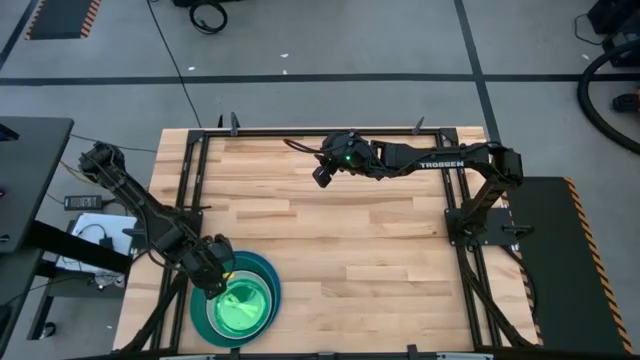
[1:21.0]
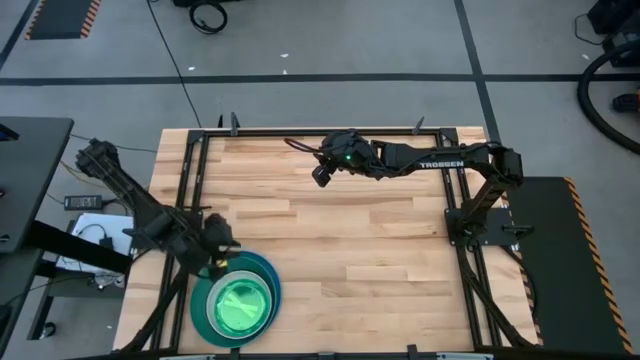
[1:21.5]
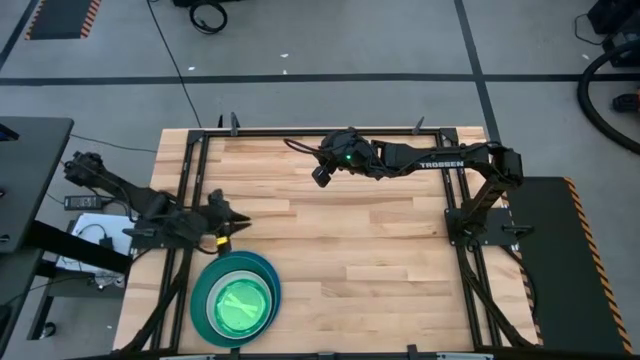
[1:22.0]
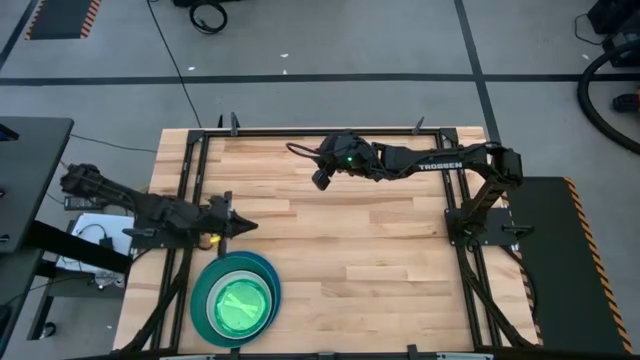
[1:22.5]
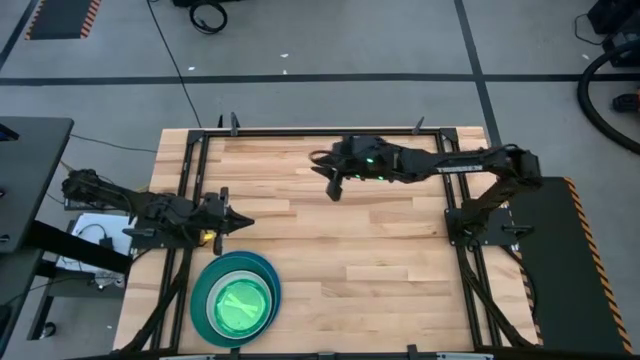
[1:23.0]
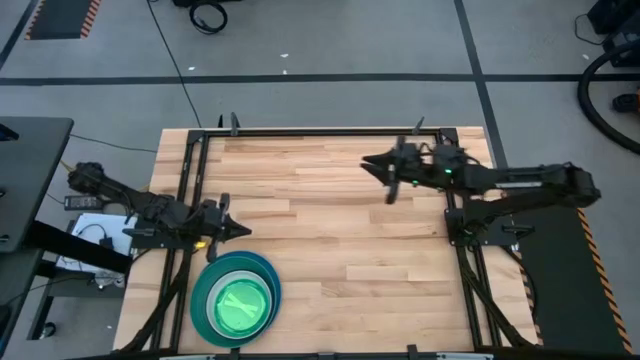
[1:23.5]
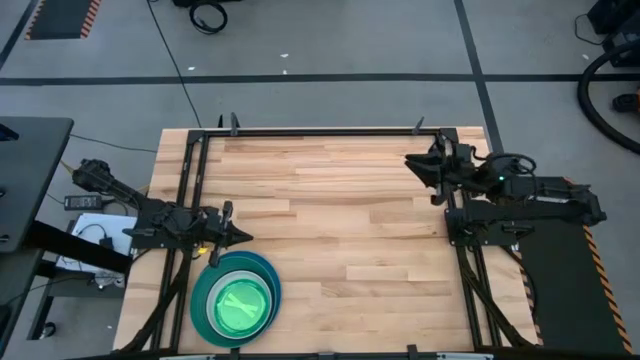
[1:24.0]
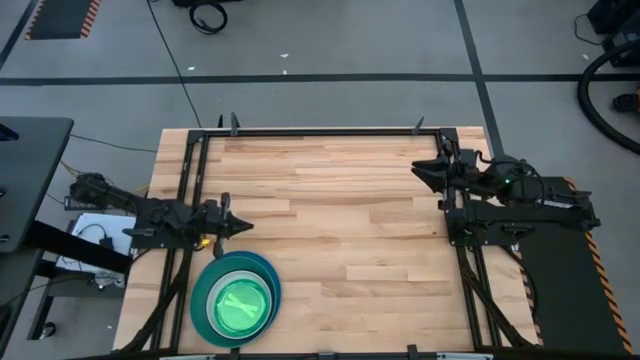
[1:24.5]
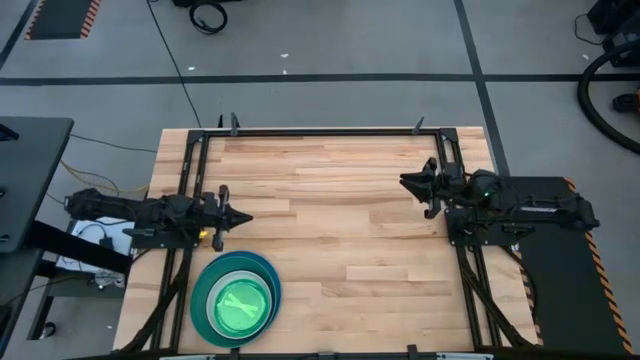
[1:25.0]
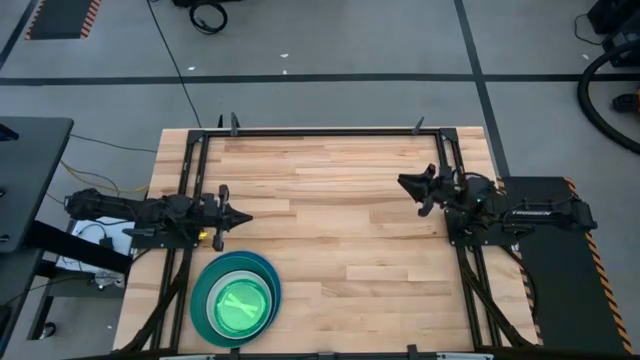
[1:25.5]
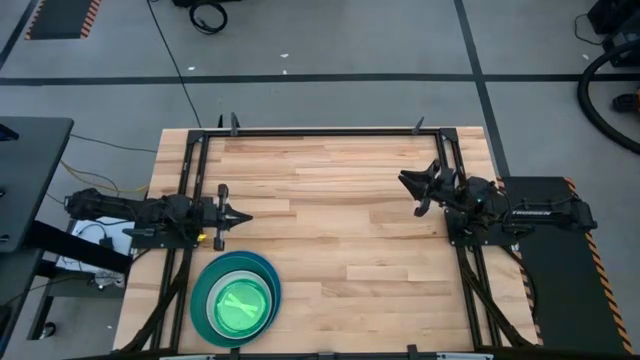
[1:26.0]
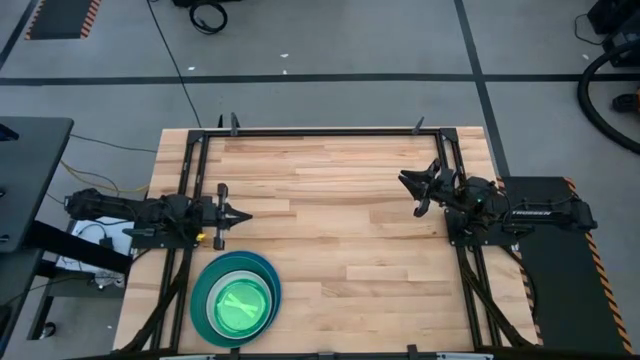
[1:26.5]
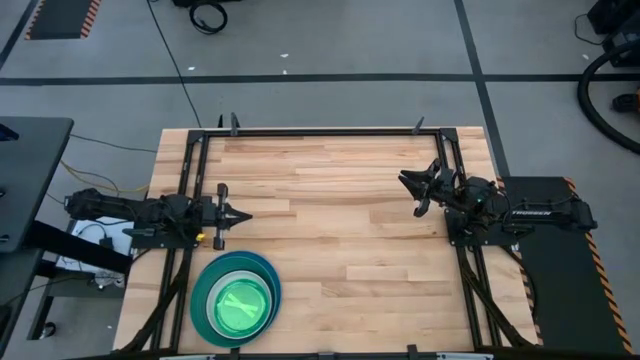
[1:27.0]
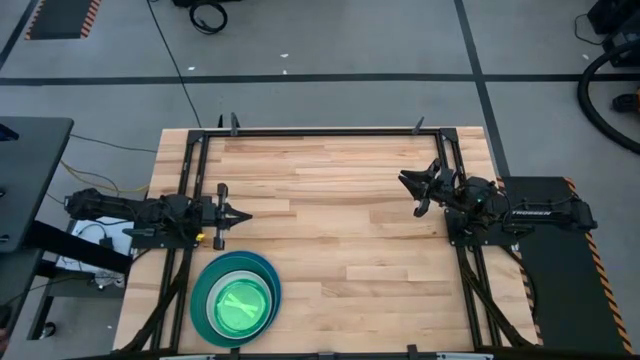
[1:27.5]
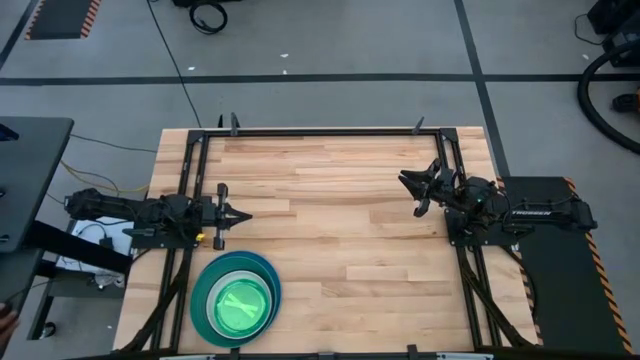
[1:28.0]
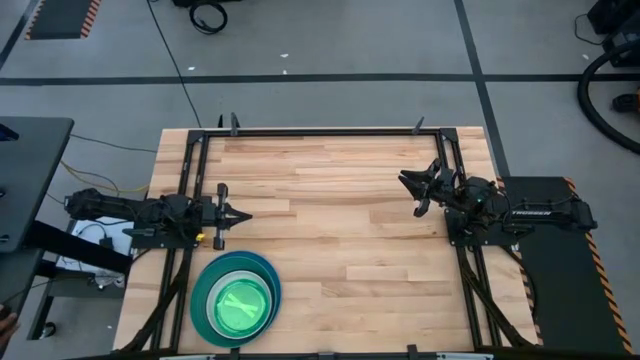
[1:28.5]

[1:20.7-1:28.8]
Task: Stack plastic plates
Return to Home Position

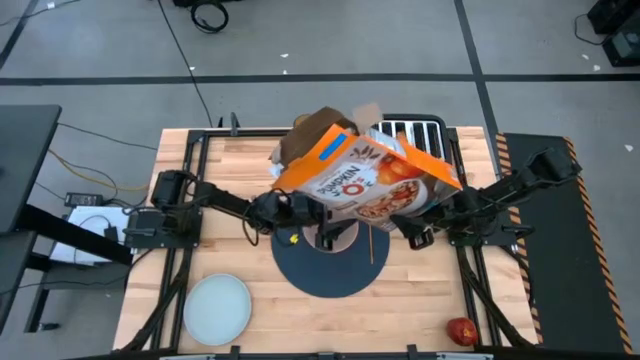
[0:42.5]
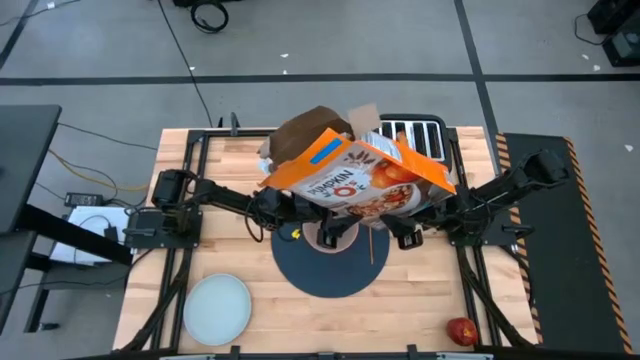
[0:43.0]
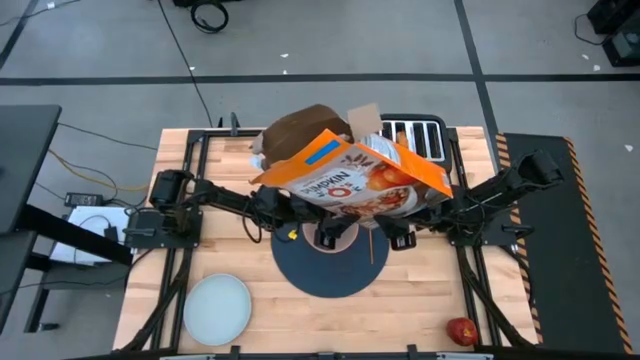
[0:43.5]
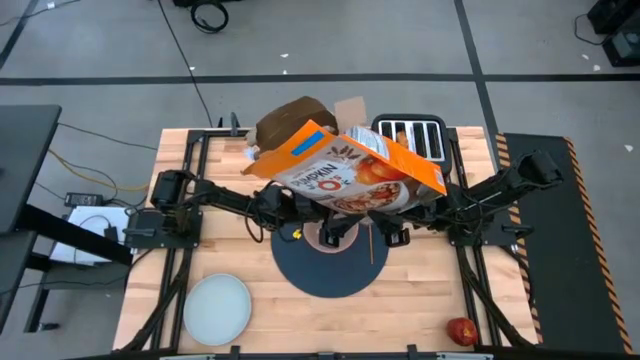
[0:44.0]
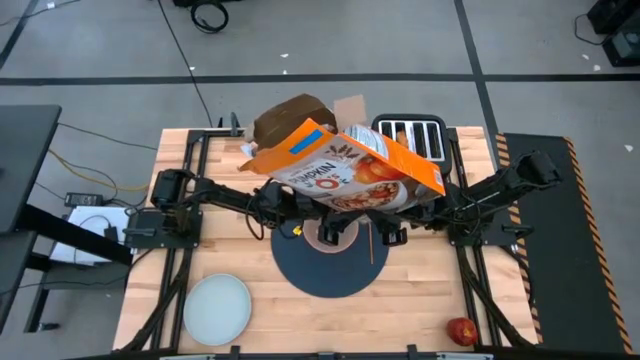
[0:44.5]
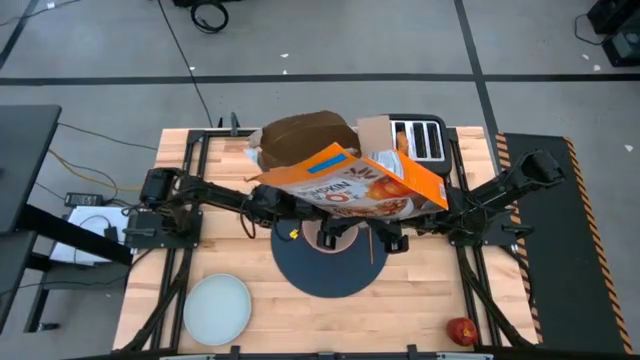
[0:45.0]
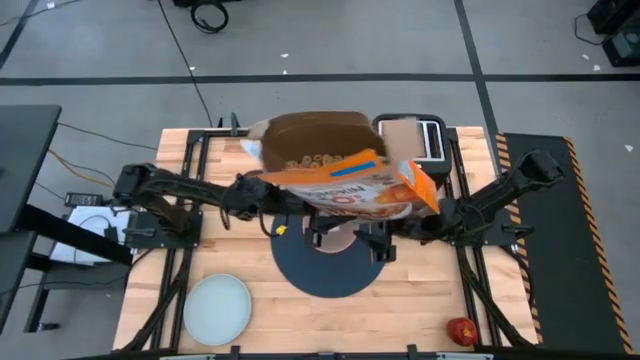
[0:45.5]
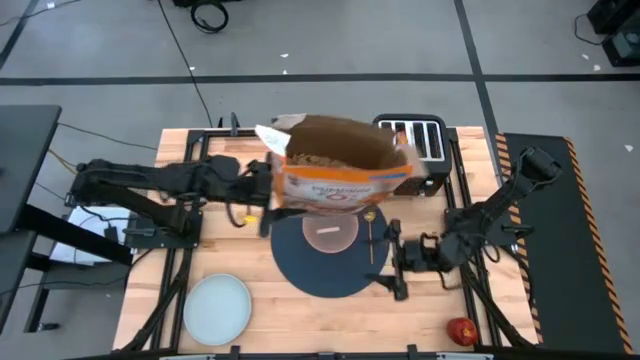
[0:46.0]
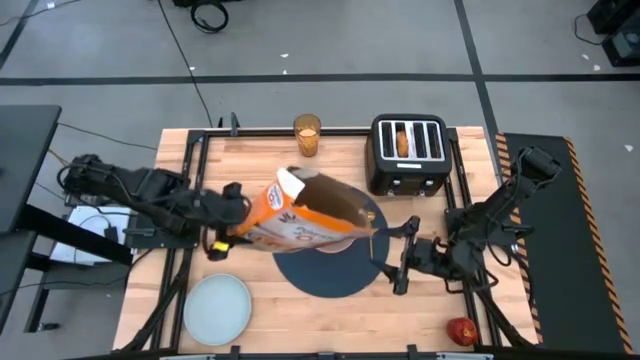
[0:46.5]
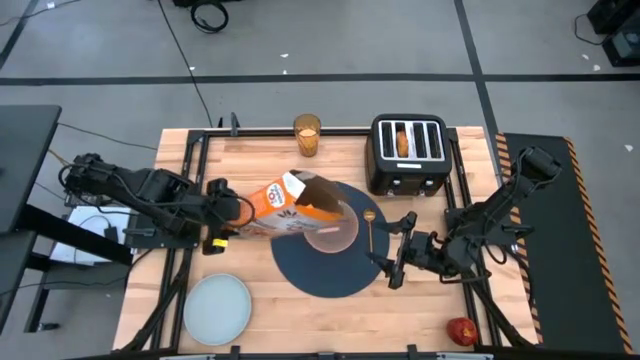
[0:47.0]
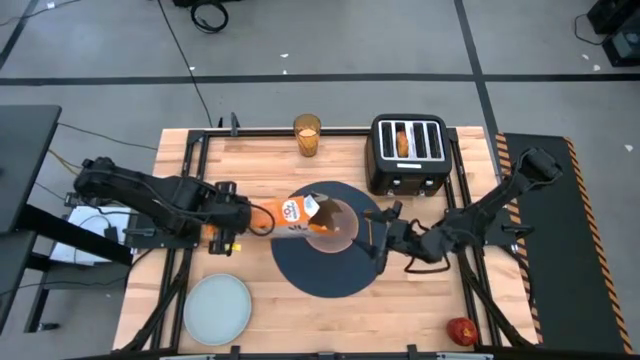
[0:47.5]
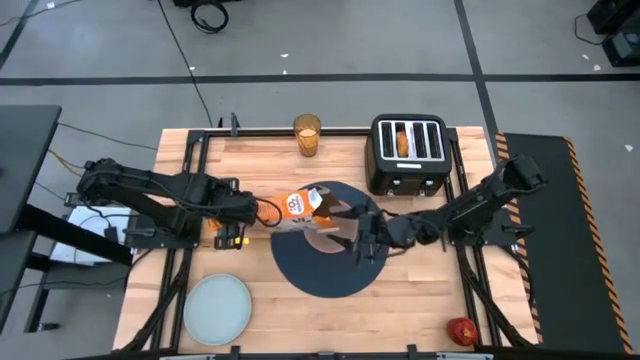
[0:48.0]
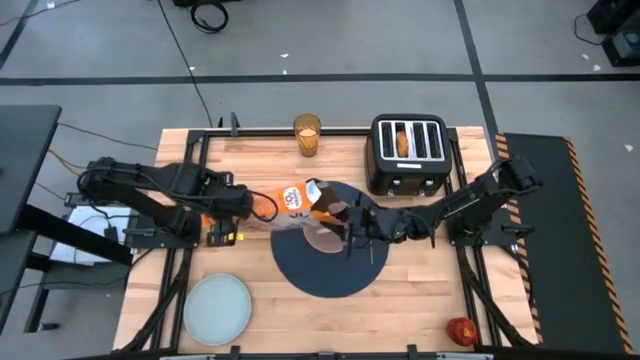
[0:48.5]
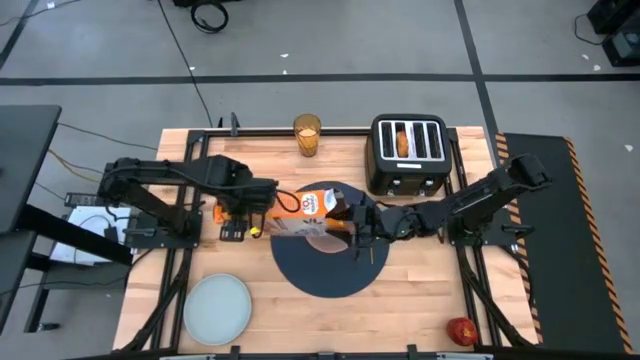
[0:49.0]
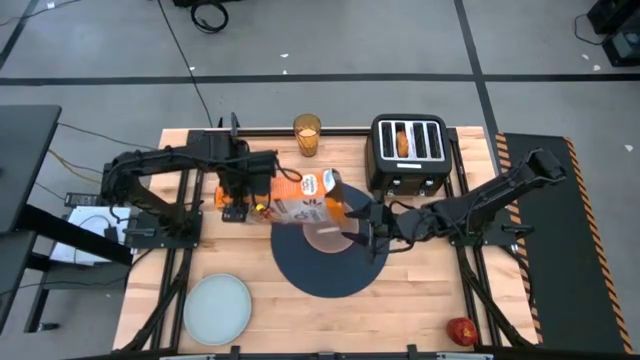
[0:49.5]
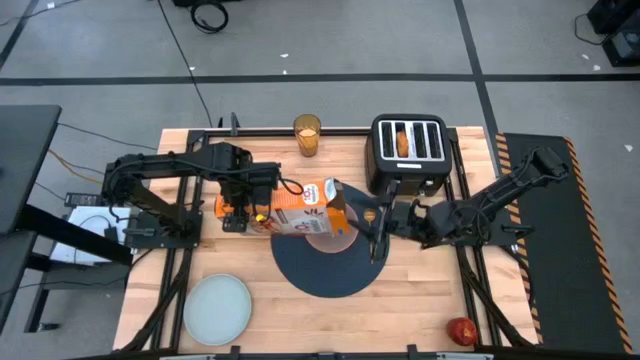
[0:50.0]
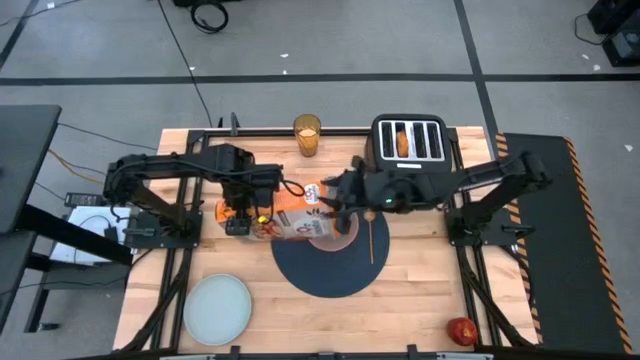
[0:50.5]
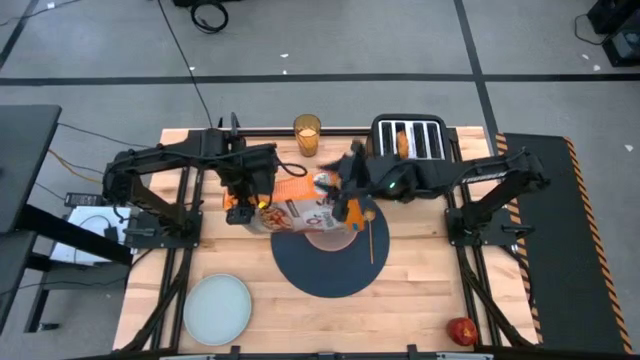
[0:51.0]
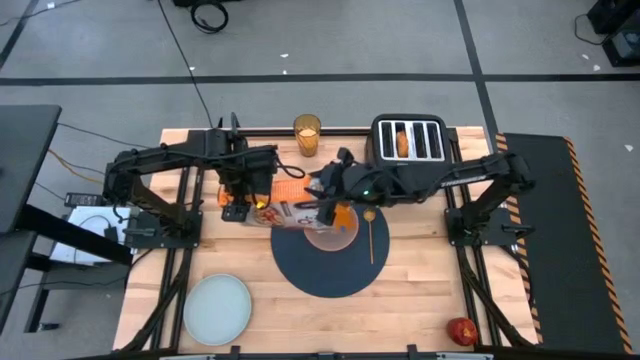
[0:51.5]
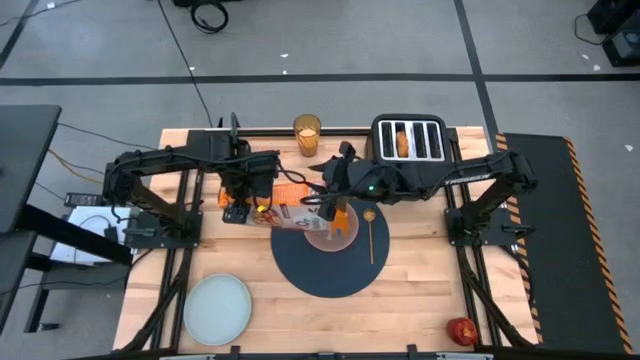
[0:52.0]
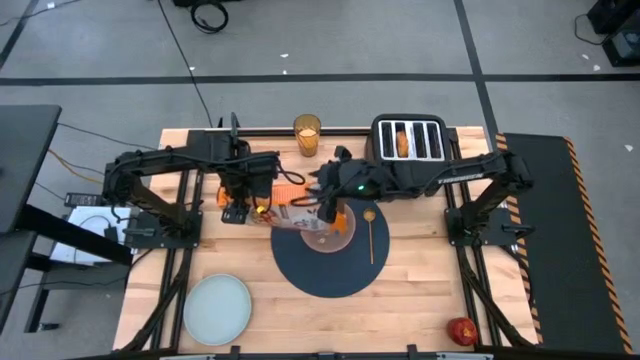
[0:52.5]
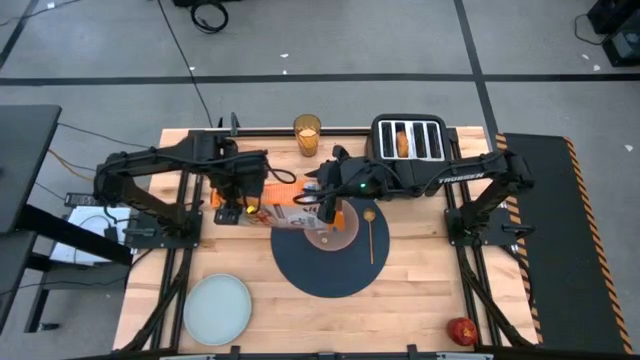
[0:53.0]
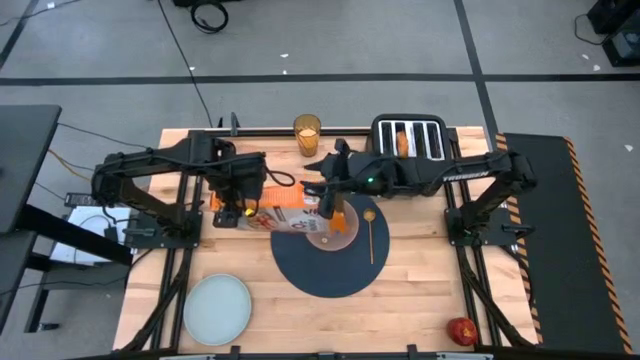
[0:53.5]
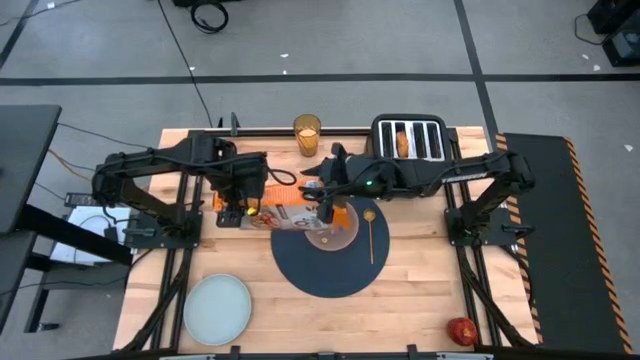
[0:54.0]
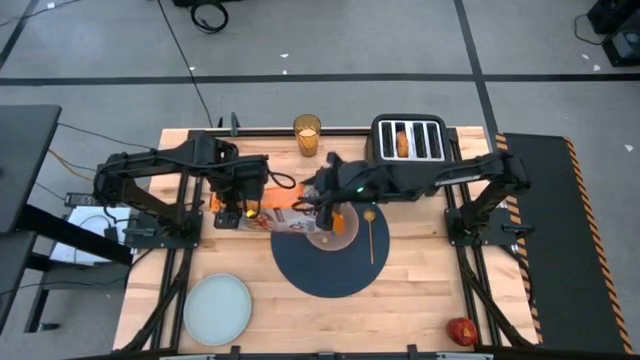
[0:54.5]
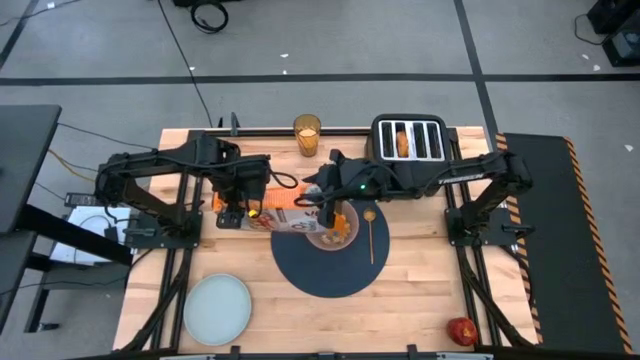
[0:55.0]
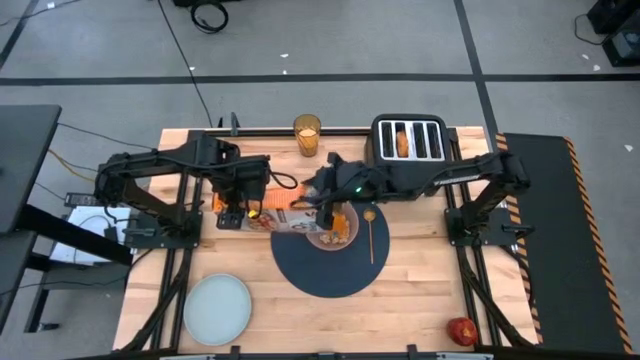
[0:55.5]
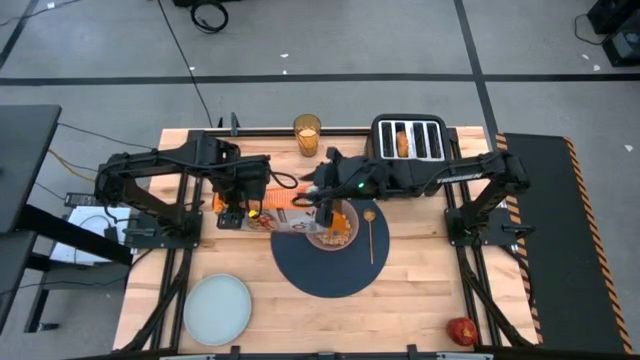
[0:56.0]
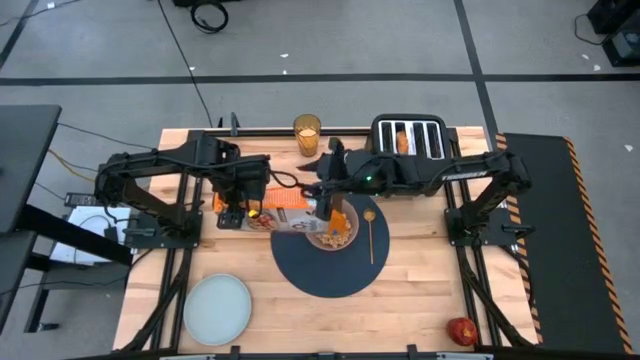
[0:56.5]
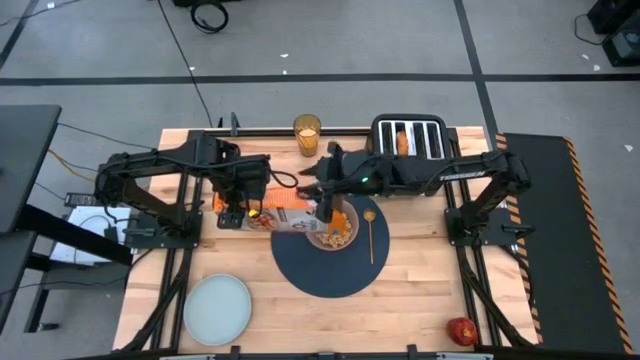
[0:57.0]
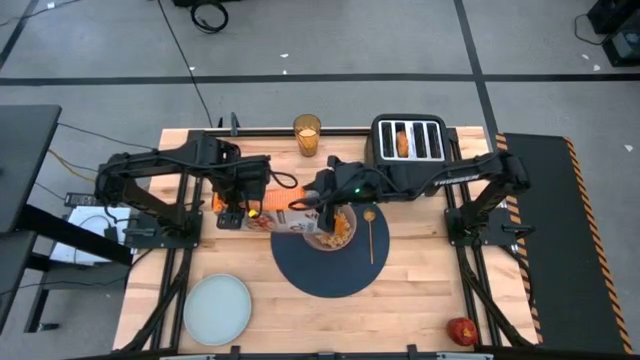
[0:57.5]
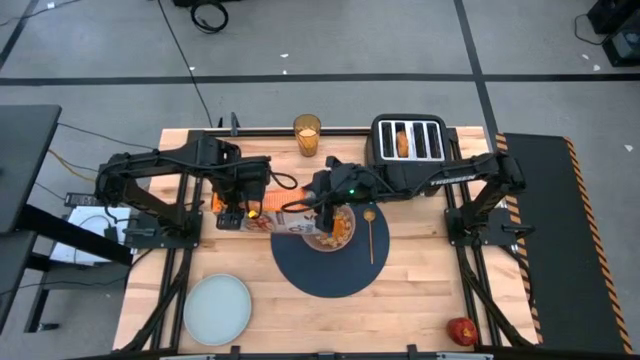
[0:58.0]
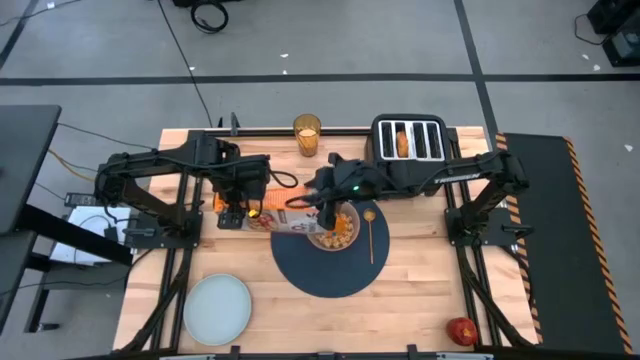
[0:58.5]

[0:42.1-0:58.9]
Task: Arrange a breakfast setting
Pour the cereal from the cereal box into the bowl
